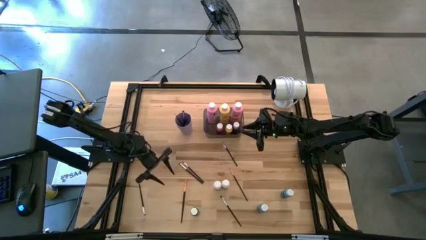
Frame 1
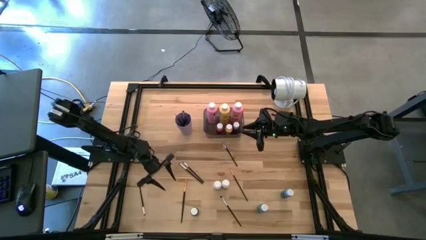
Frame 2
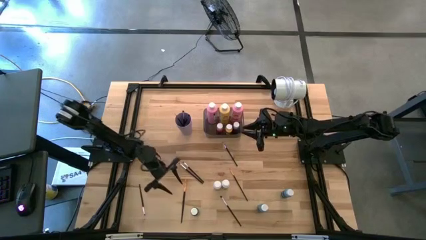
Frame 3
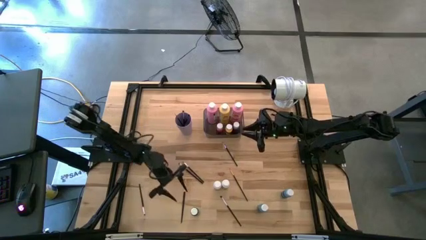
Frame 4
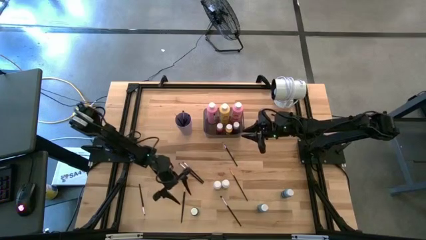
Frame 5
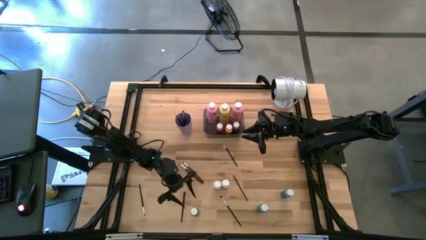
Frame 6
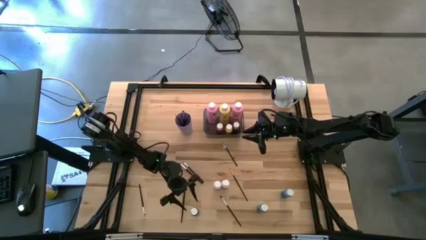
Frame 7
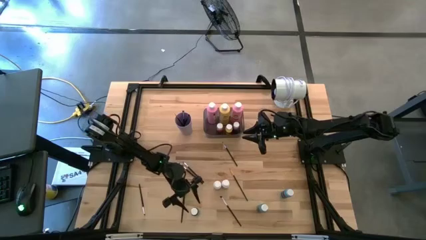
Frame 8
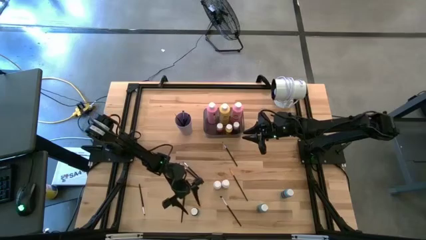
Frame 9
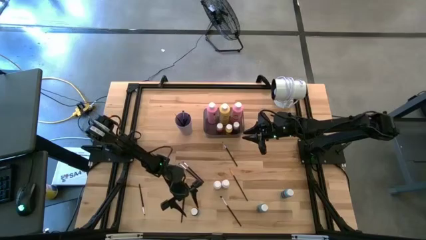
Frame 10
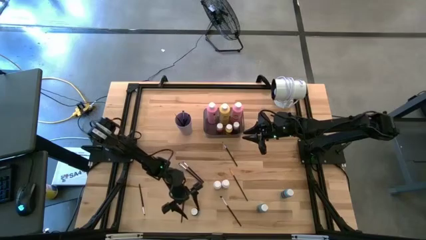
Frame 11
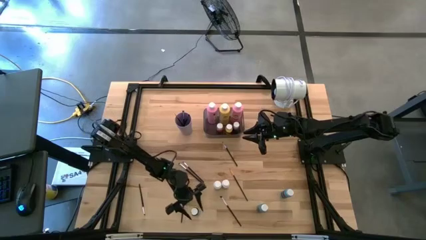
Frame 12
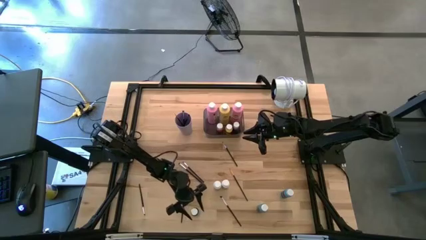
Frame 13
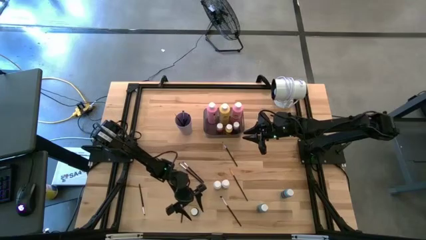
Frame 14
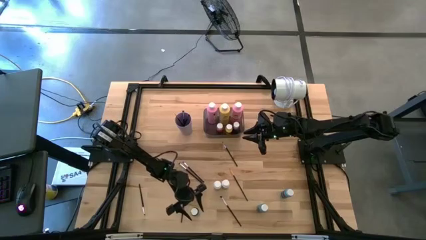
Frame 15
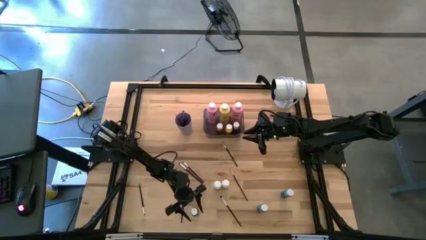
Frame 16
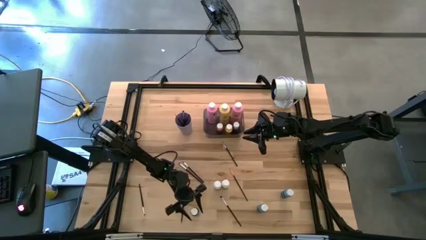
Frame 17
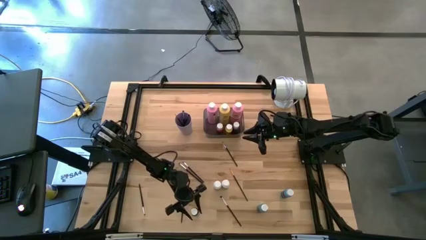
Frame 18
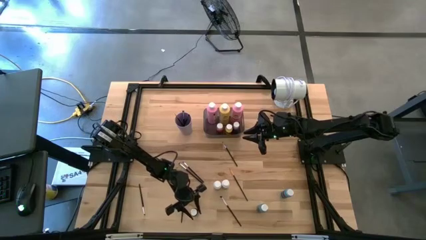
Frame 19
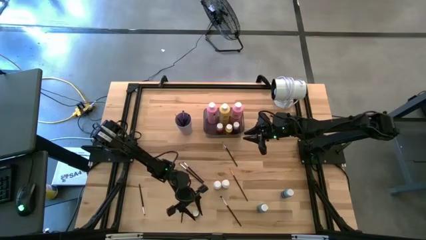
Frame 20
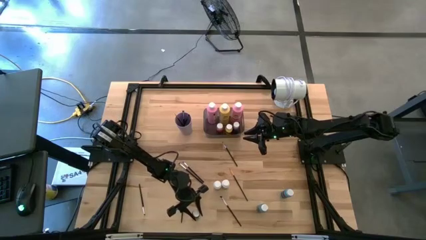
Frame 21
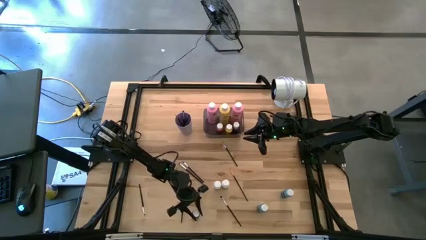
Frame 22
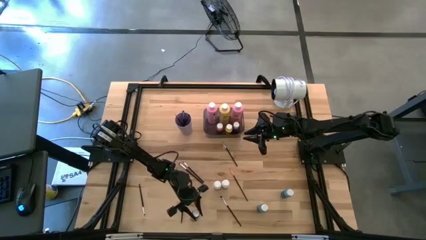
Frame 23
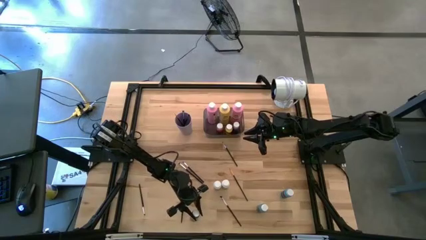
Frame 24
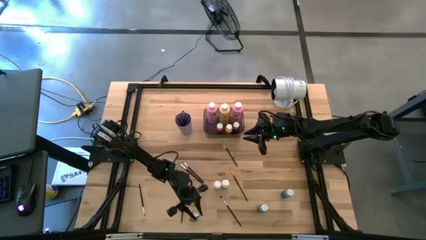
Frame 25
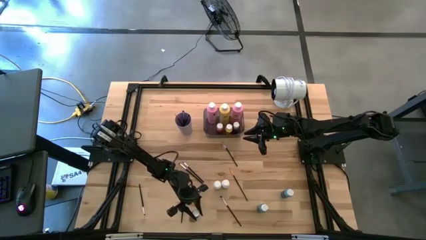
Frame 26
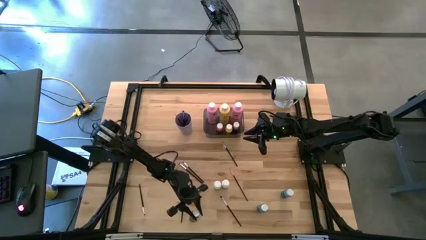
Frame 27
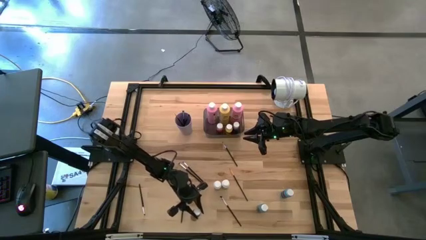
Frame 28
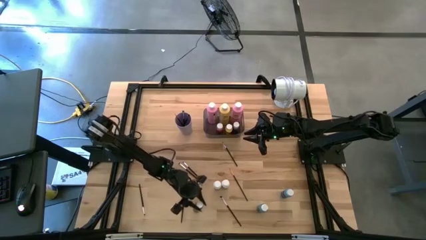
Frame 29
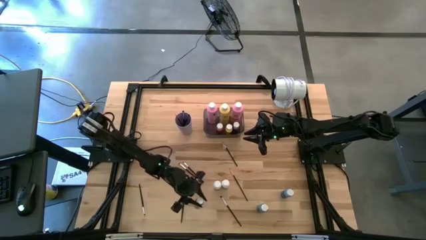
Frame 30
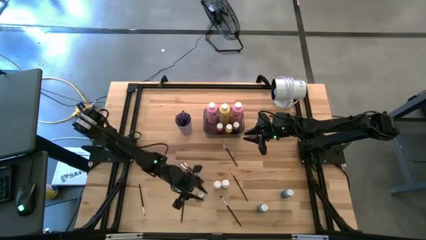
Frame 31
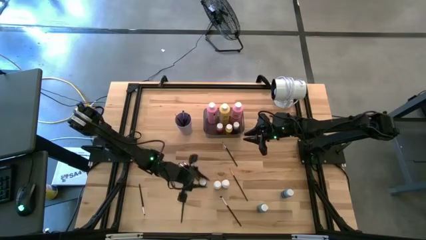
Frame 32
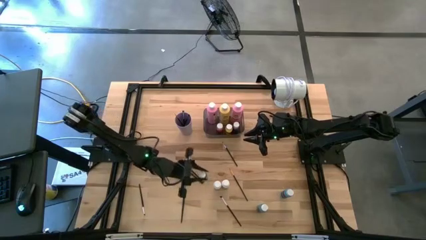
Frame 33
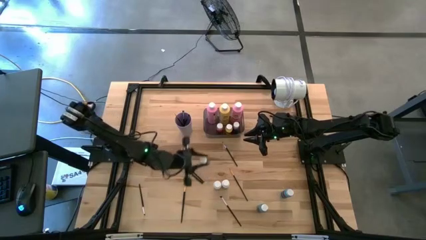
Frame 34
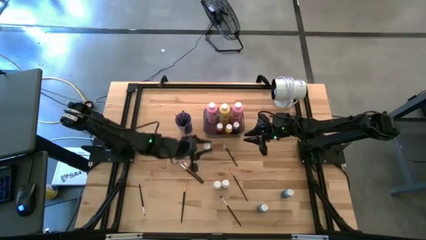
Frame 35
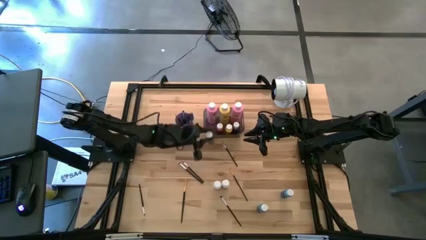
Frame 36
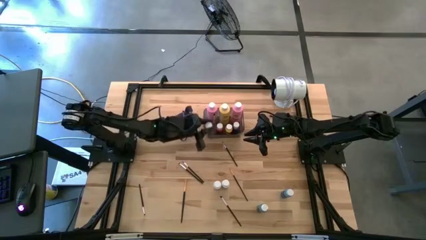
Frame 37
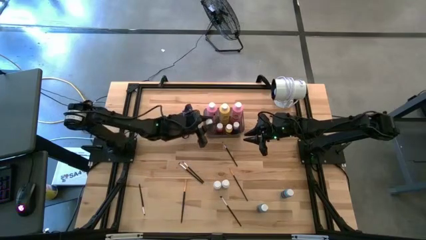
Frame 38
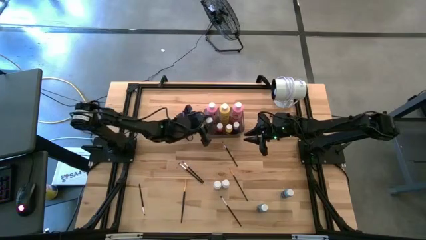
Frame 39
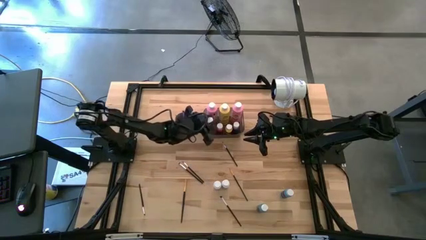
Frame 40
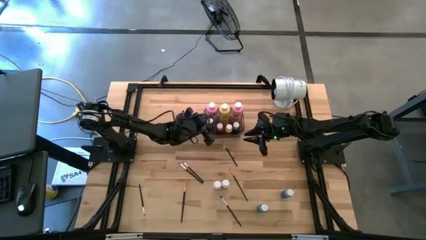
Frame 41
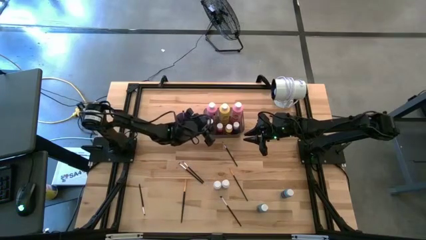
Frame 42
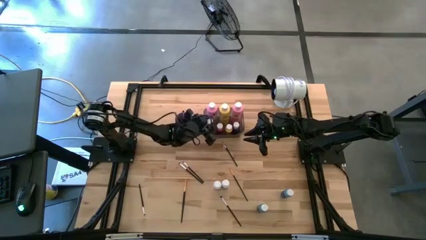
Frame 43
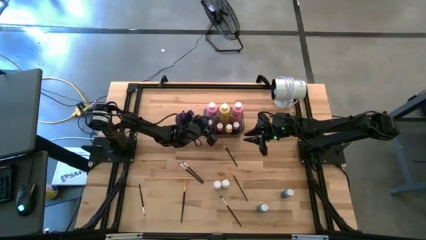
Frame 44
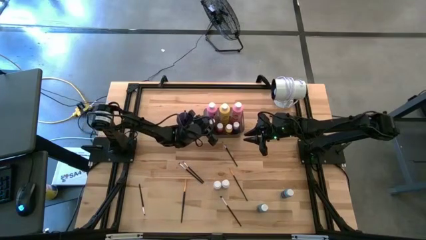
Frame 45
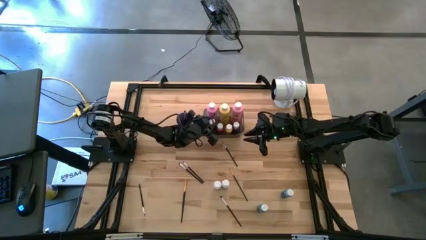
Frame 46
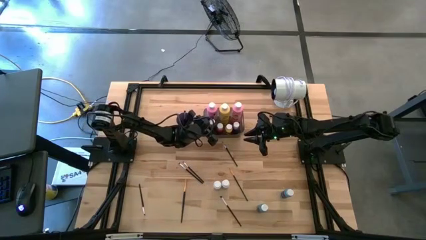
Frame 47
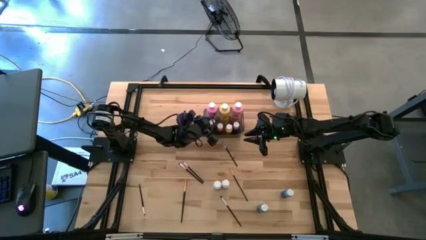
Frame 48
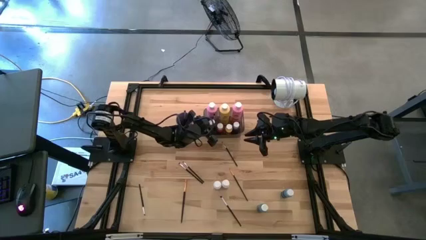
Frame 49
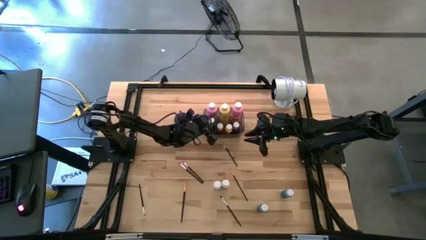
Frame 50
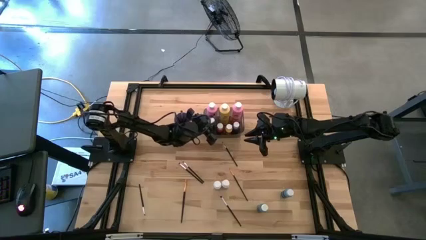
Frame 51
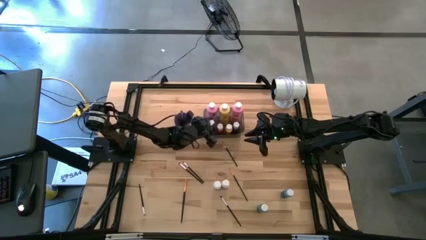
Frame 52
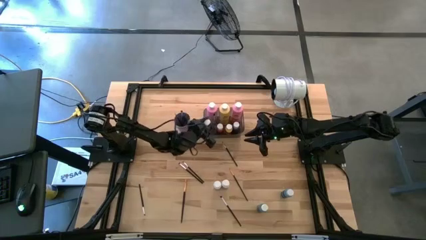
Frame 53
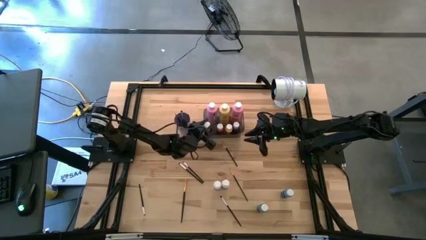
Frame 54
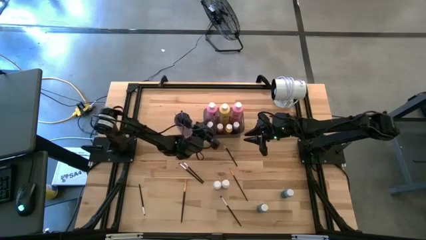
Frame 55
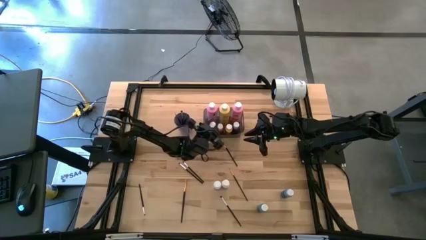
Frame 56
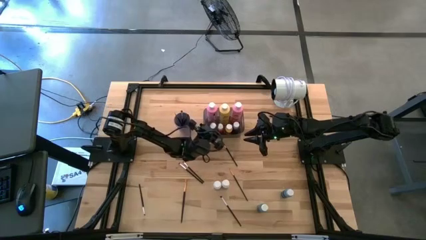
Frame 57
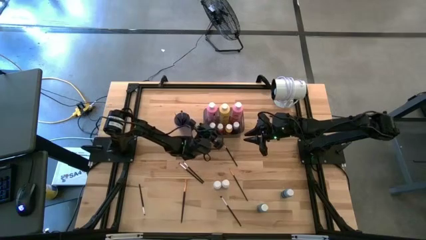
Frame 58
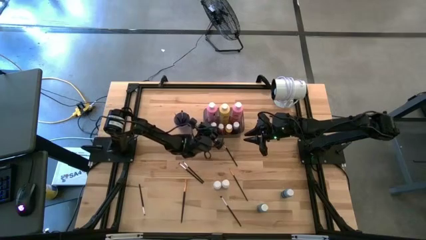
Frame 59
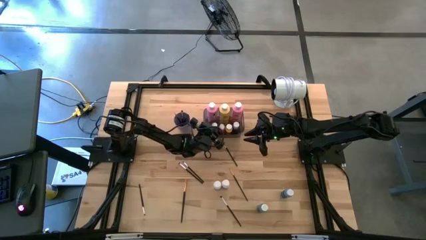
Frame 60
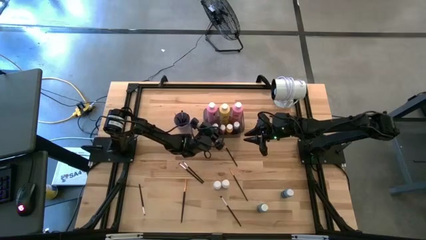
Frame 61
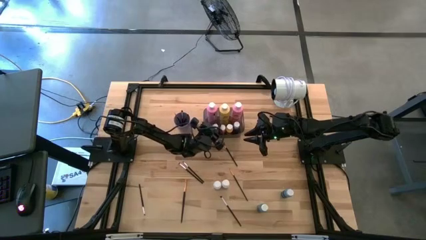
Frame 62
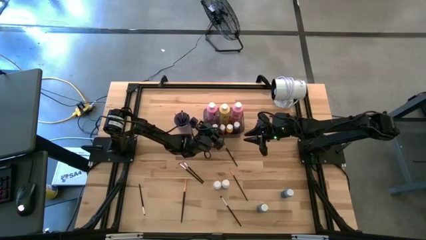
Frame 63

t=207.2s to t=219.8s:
Task: Pick & Place Paint Supplies
Put the small green paint bottle into the gray bin

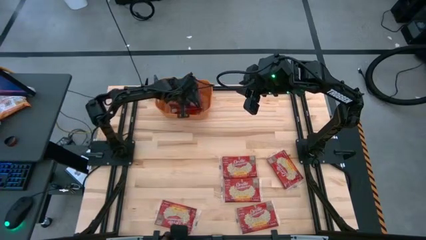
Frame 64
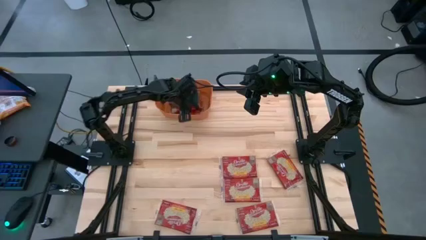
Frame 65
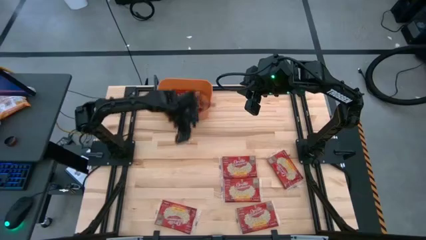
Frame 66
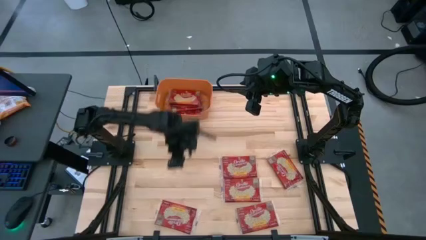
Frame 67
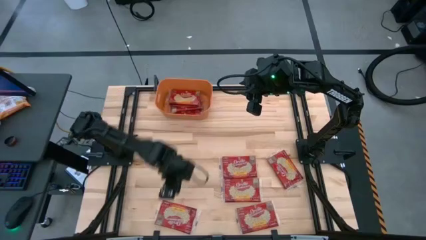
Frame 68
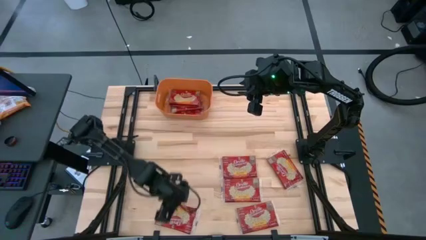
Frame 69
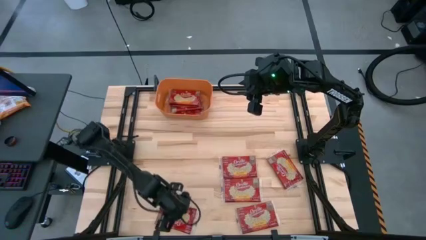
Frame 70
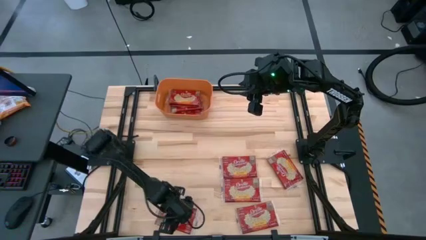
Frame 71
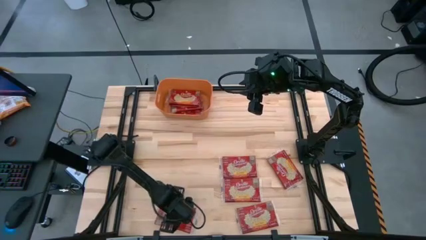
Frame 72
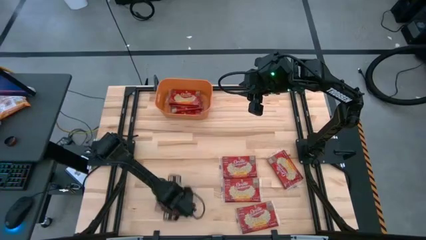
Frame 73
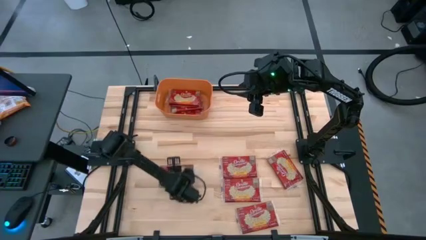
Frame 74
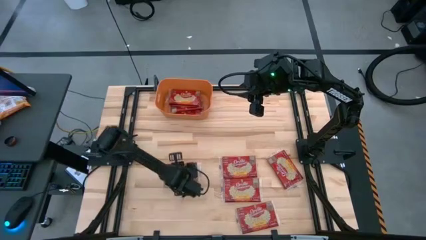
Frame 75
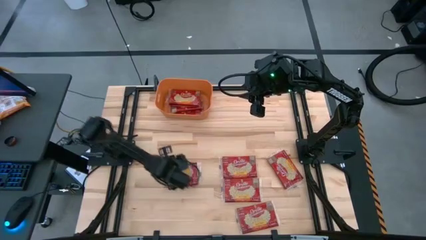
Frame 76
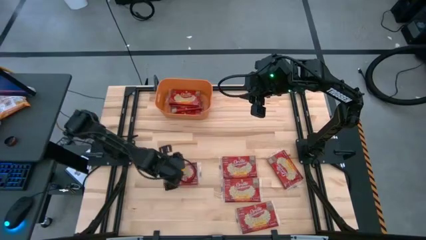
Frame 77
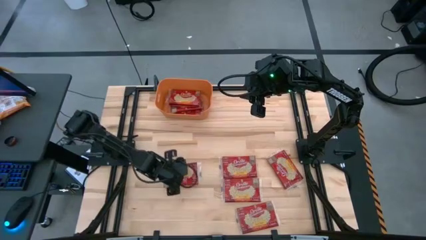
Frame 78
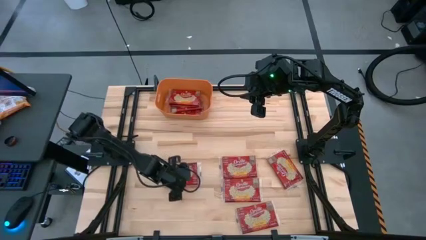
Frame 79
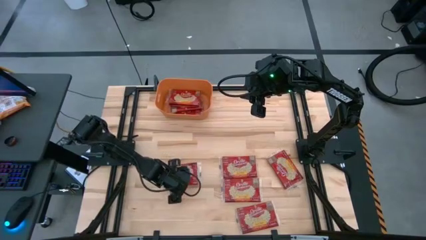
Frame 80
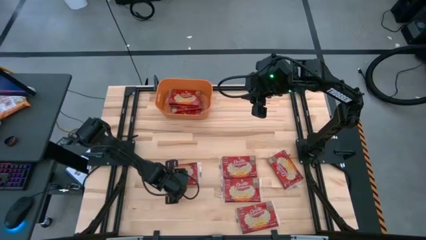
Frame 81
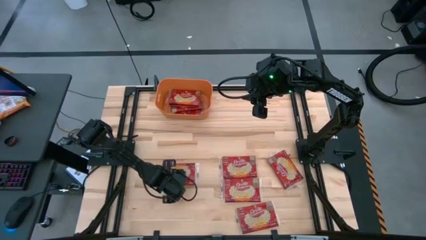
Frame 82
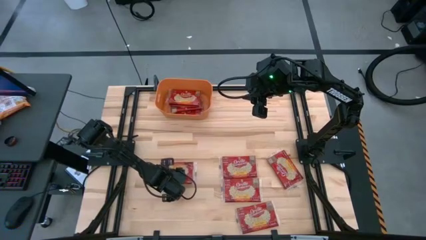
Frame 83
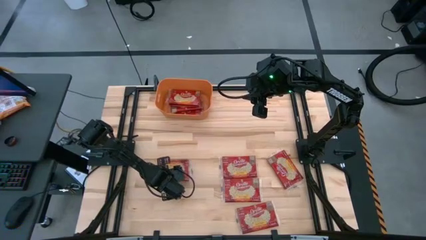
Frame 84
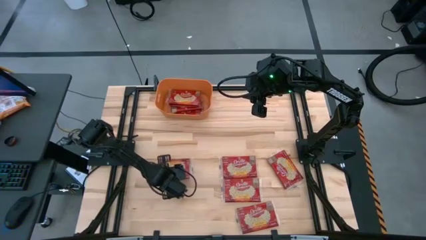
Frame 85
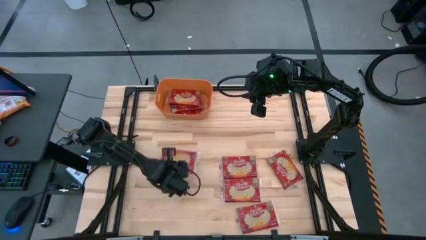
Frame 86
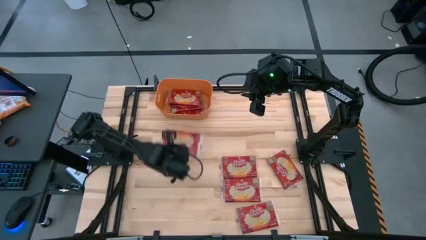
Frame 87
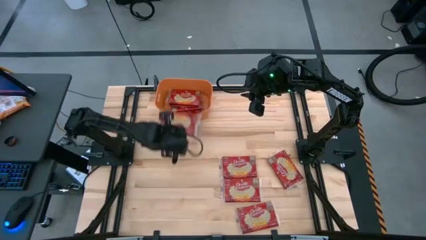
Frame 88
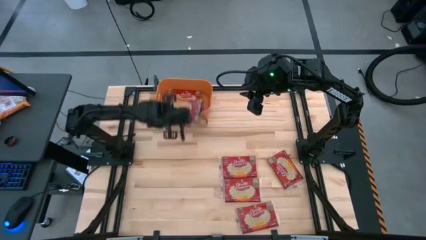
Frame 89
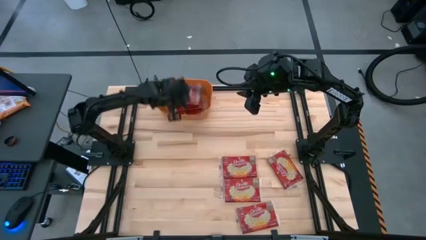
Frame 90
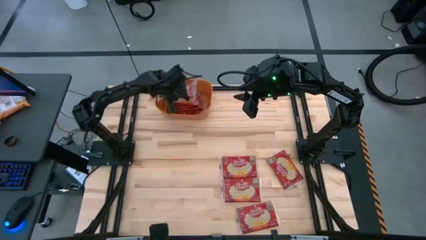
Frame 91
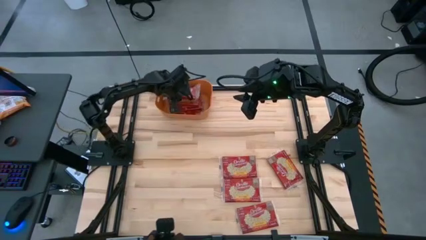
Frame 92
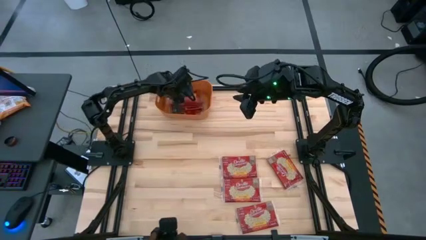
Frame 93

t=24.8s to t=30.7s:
Task: Sort popcorn bags into baskets
Put the red popcorn bag into the orange bin
